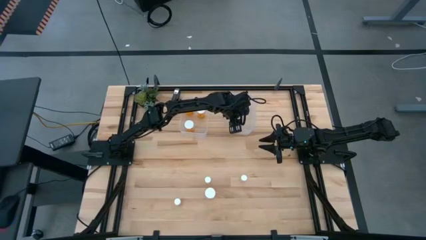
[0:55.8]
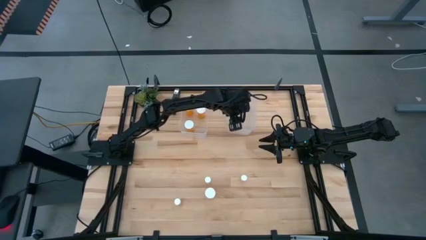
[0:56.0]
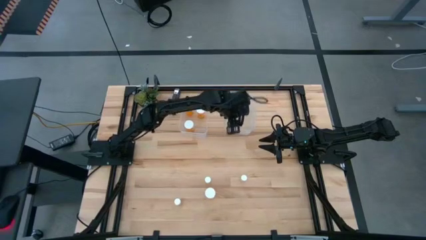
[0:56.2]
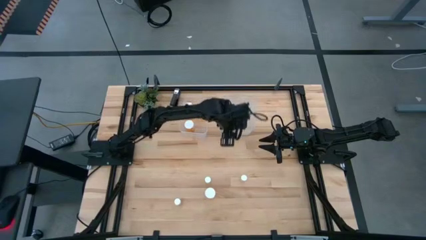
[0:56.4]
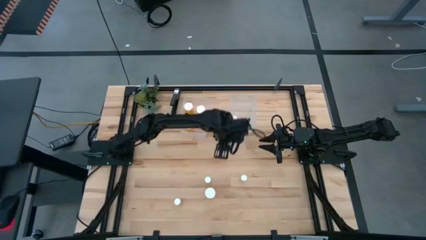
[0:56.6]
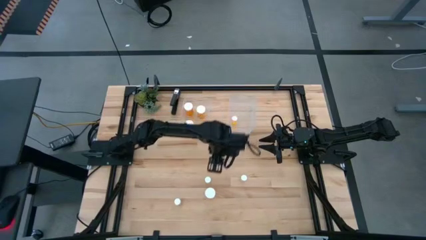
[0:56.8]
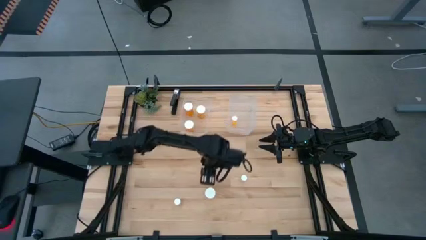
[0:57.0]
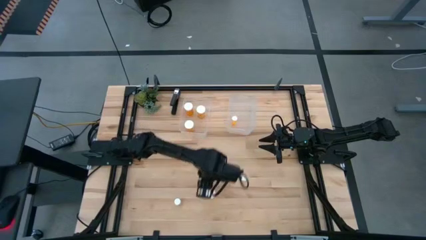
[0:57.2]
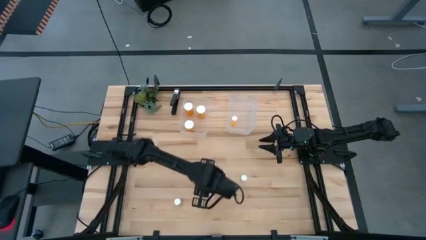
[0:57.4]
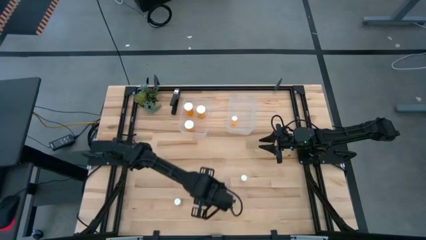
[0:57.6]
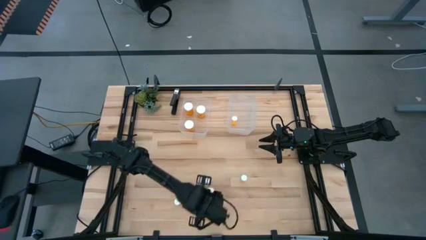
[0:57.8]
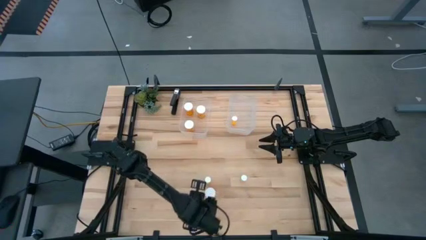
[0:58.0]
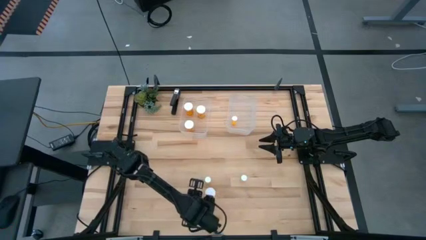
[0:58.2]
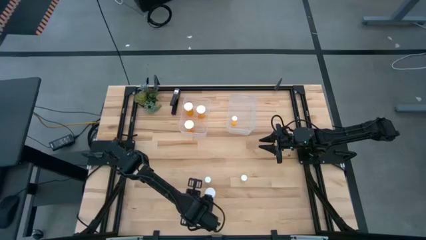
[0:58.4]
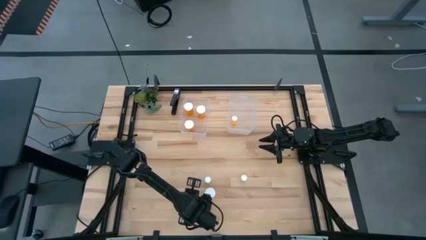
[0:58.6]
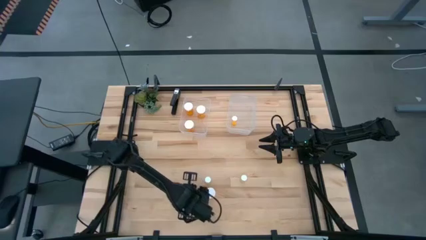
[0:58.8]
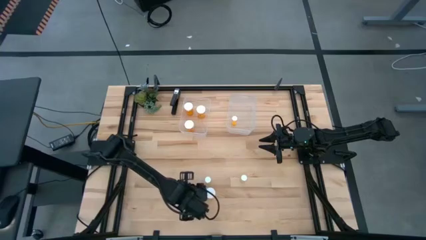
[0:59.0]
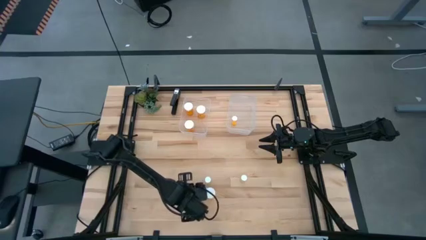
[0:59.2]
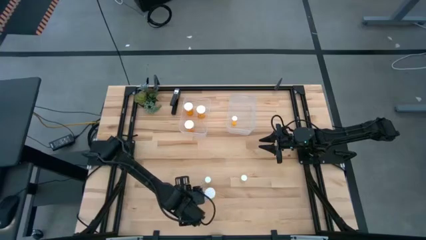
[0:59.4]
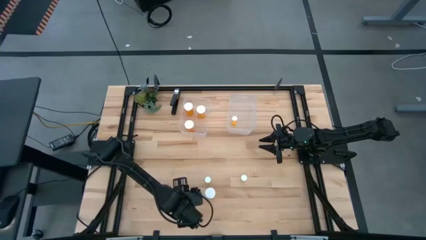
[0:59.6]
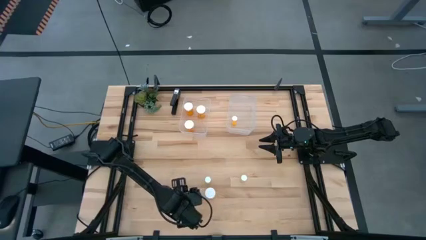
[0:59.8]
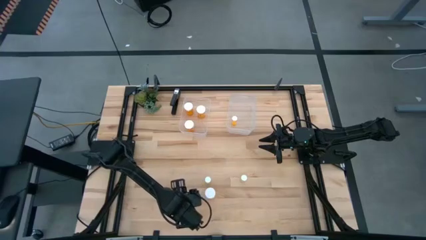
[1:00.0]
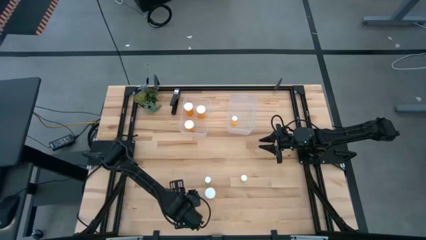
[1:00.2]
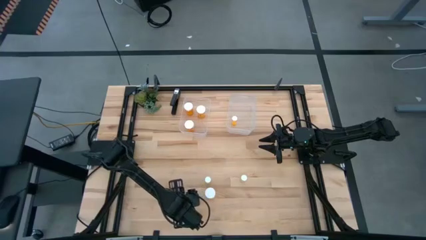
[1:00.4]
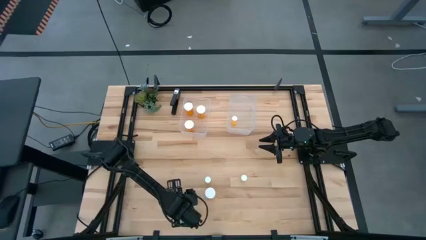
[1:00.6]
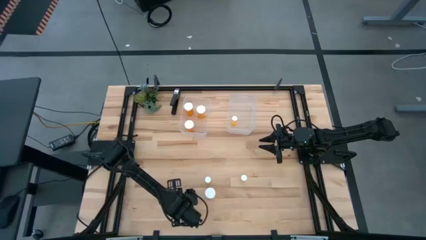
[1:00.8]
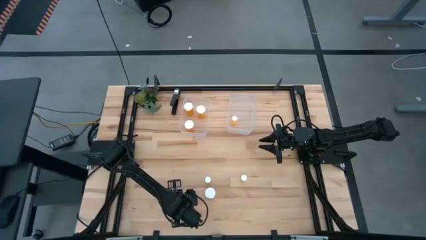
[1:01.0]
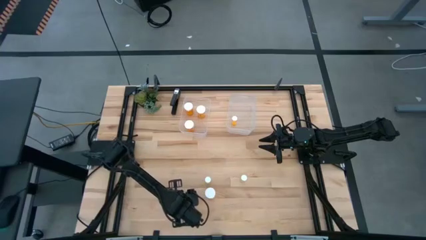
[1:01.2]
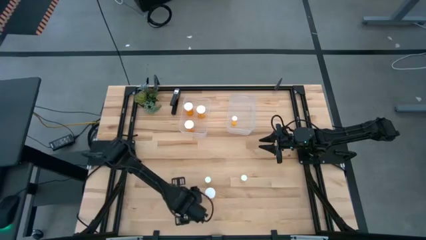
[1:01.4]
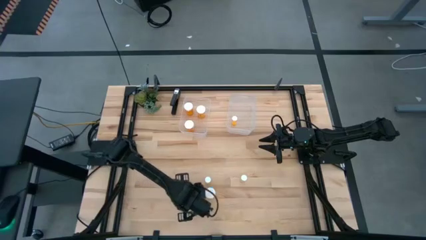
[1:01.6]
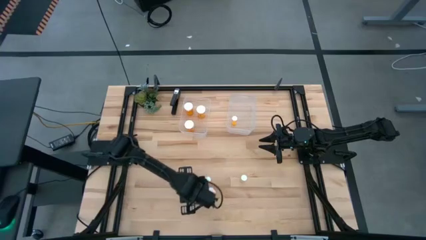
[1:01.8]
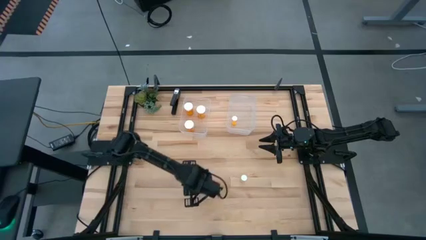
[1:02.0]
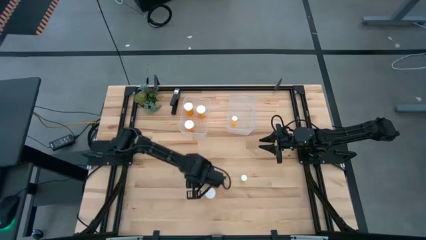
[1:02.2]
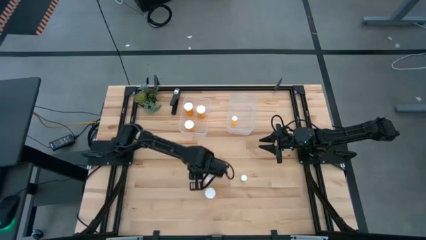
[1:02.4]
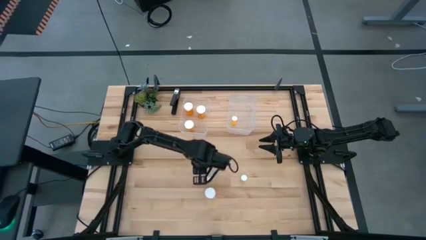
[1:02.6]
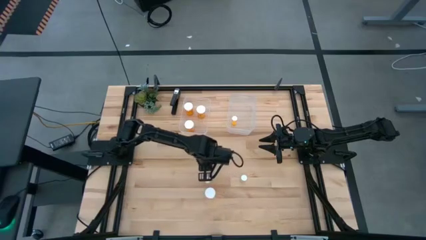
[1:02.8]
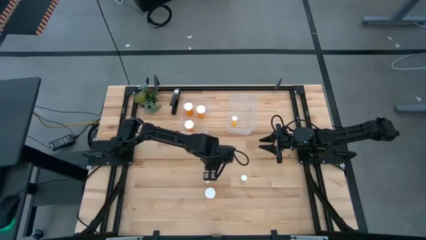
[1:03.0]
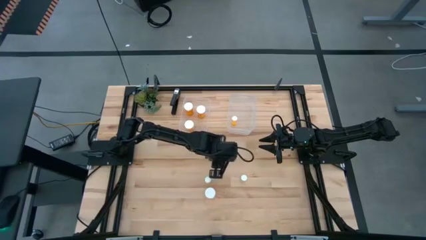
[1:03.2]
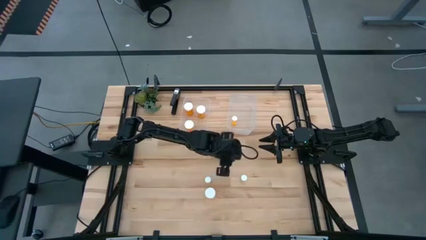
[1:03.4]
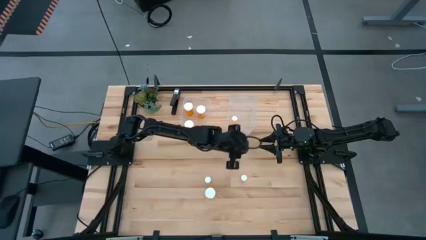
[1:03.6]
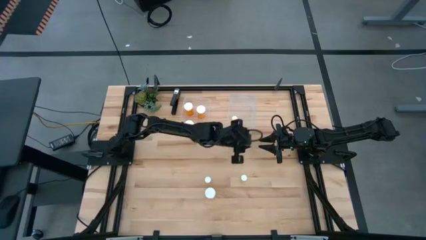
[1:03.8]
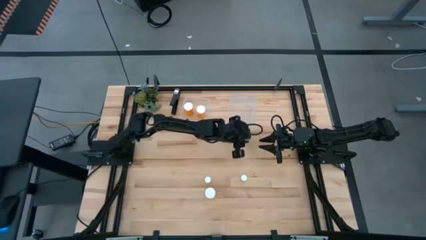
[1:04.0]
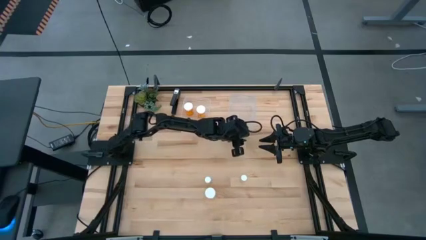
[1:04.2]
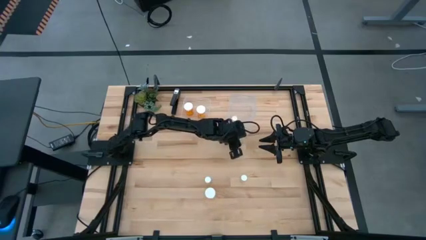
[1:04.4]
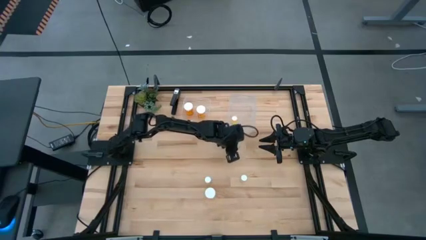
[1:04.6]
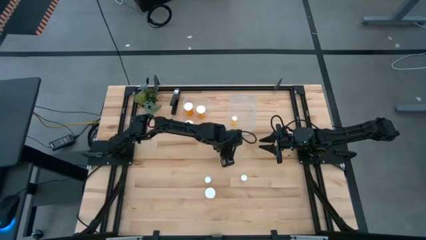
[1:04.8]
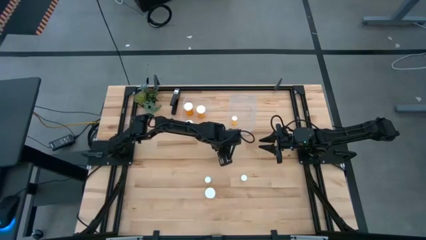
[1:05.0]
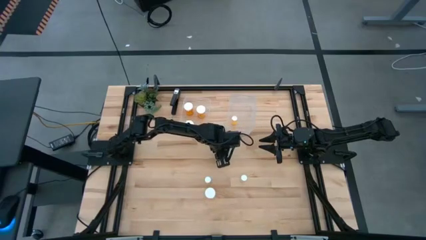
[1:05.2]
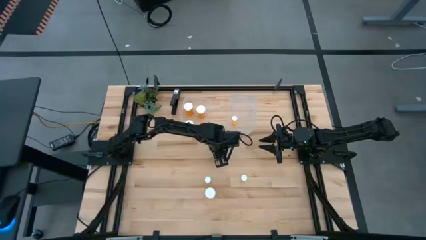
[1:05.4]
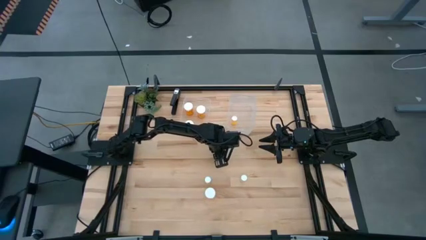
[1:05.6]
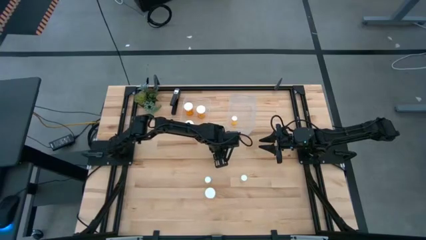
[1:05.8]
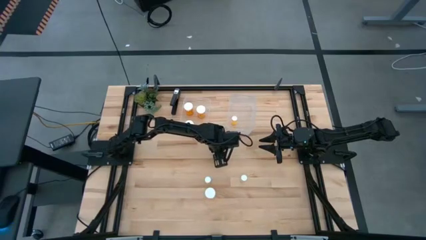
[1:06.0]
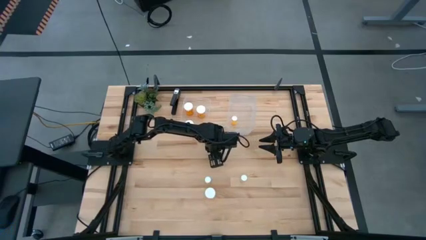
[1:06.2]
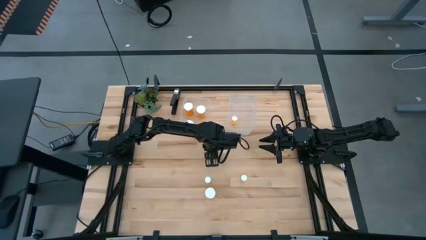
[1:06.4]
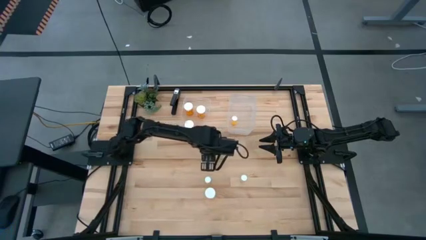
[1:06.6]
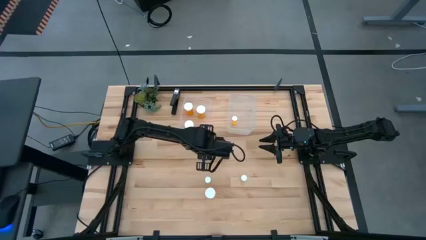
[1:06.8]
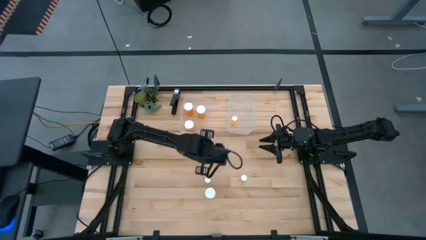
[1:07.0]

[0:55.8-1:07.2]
Task: Pick and place medicine bottles into bin by pill shape (circle, oval)
Put the small yellow pill bottle in the right transparent bin
